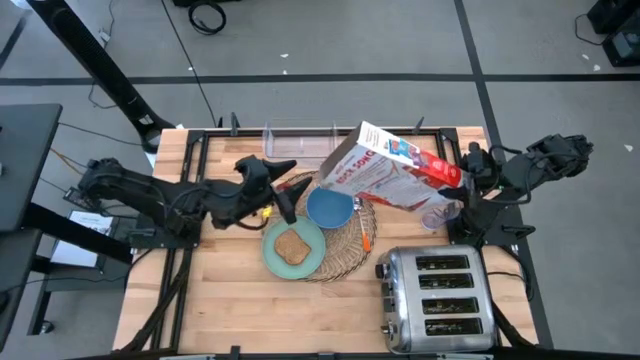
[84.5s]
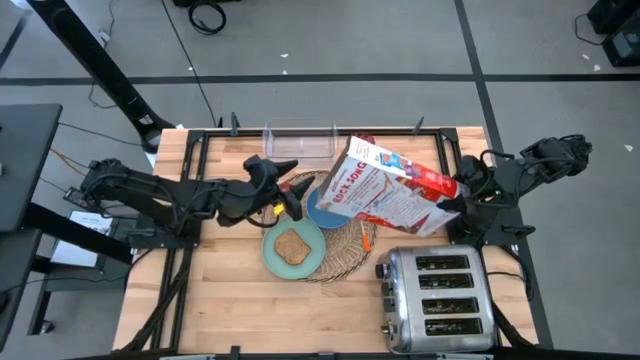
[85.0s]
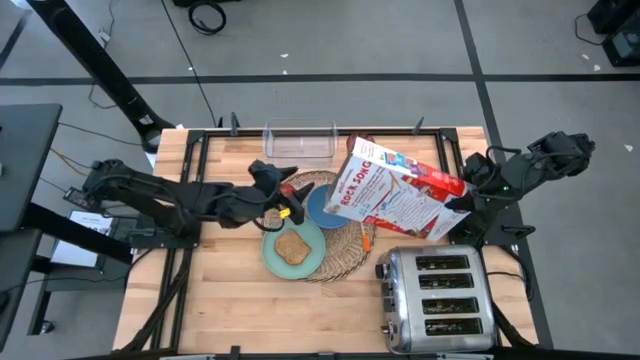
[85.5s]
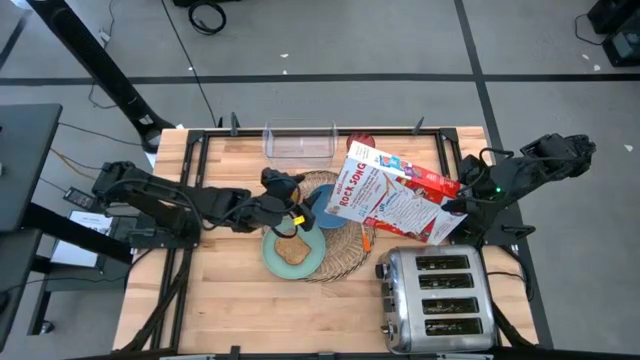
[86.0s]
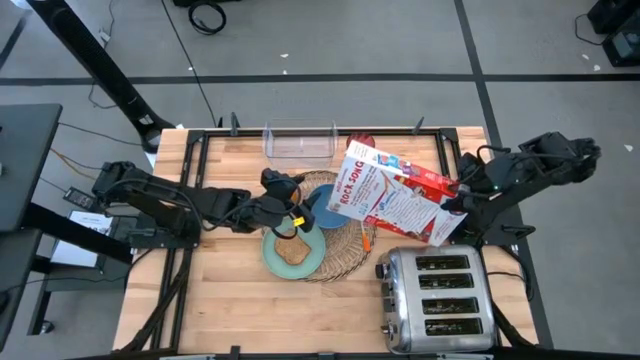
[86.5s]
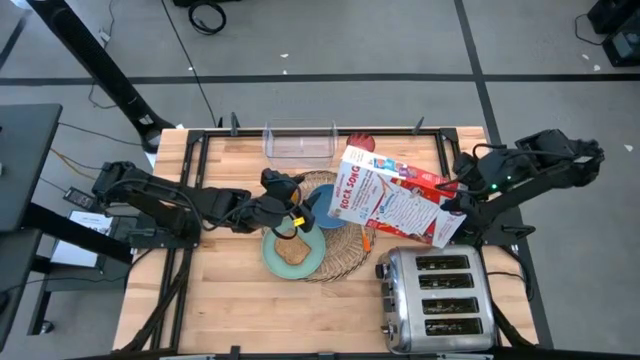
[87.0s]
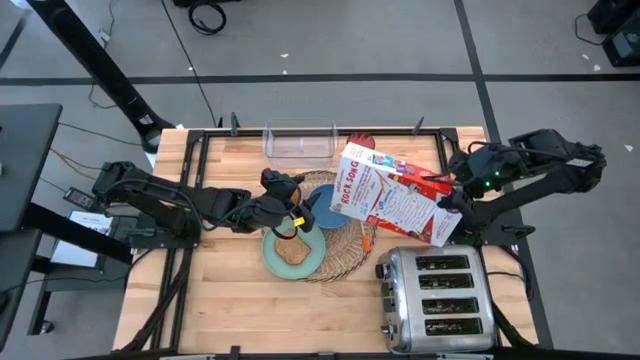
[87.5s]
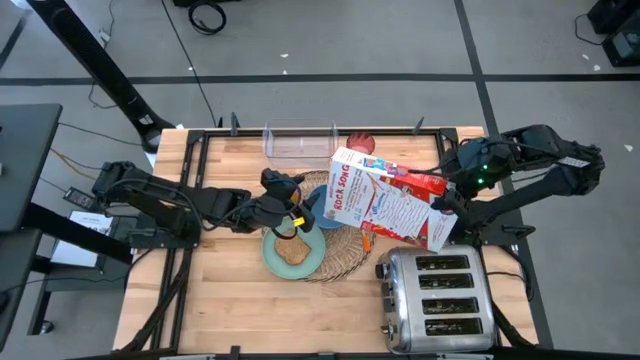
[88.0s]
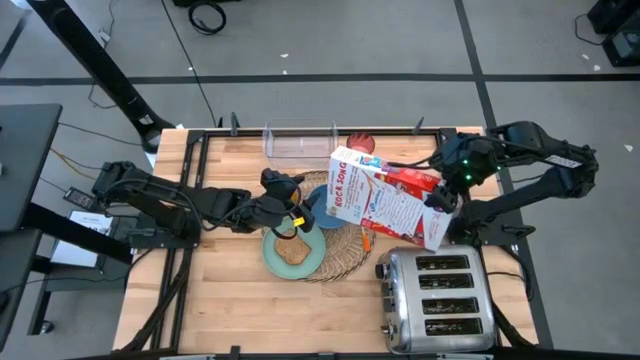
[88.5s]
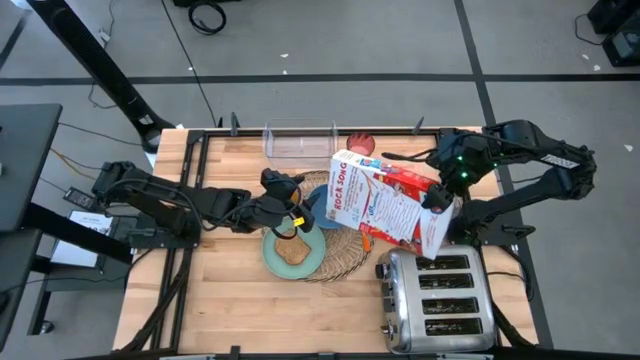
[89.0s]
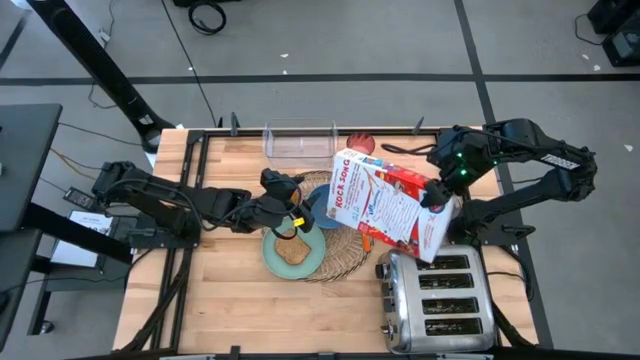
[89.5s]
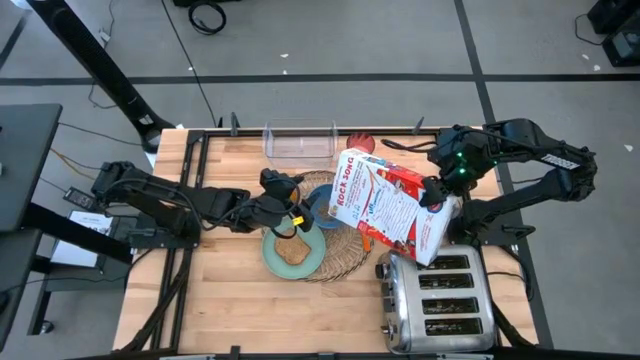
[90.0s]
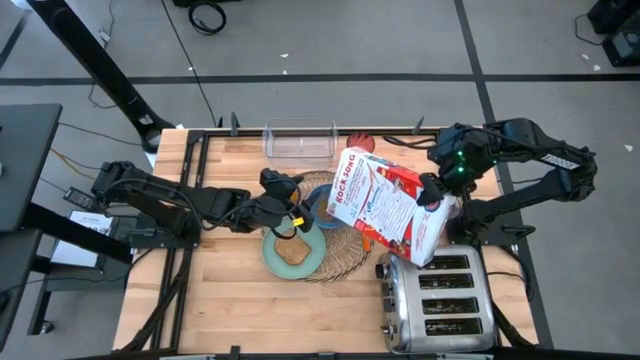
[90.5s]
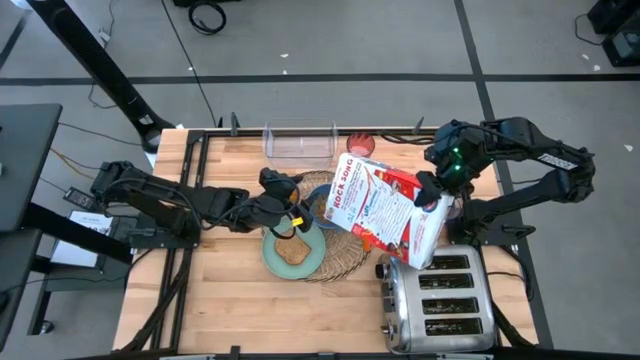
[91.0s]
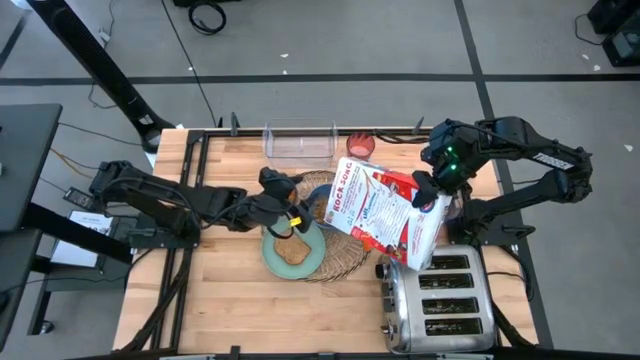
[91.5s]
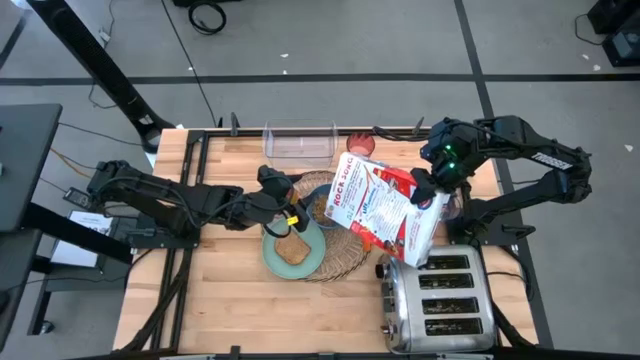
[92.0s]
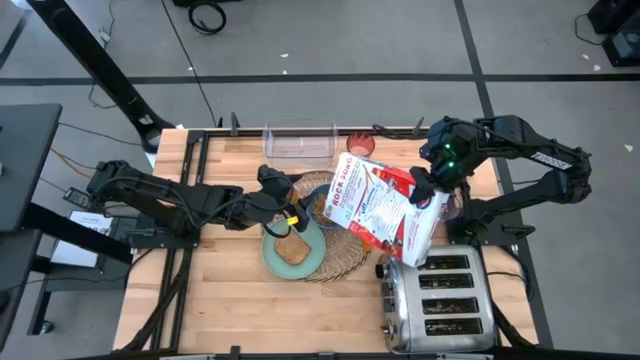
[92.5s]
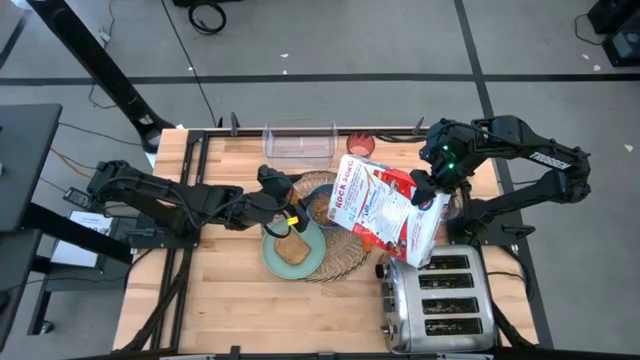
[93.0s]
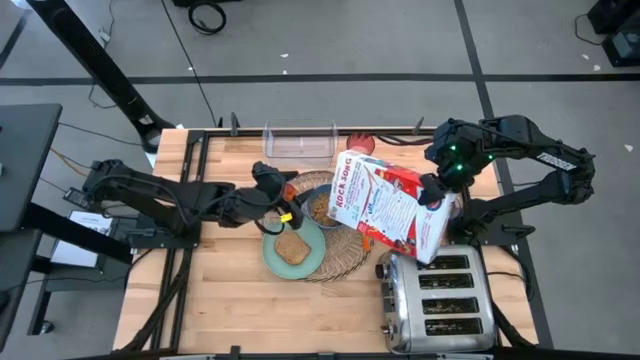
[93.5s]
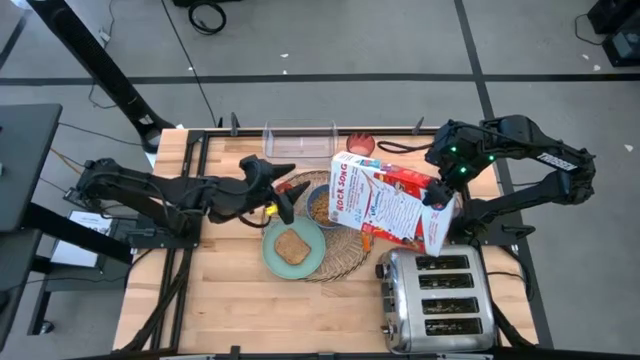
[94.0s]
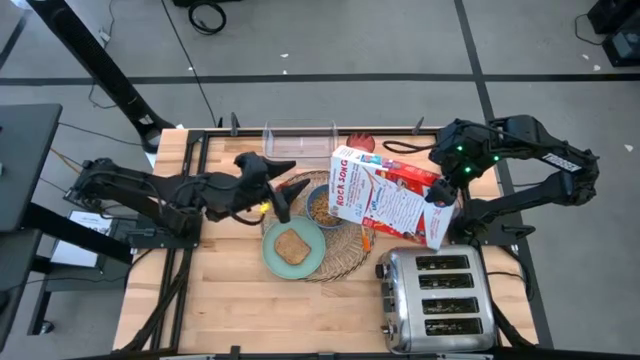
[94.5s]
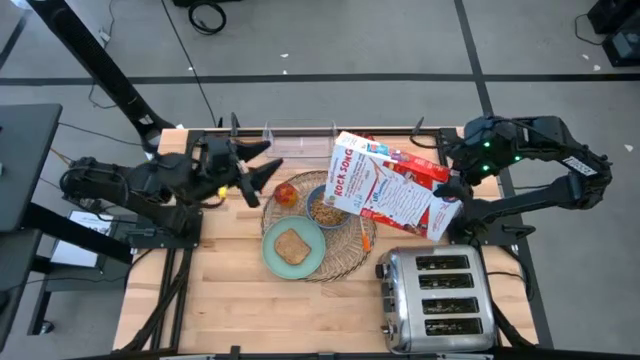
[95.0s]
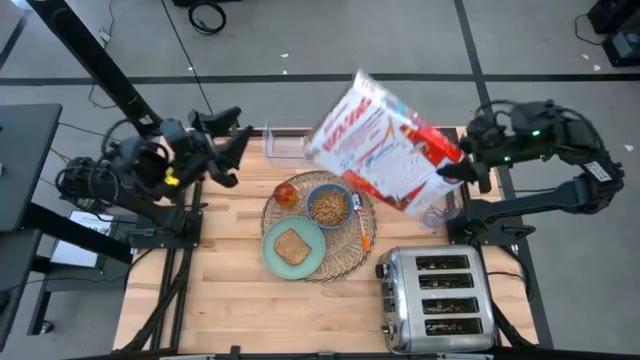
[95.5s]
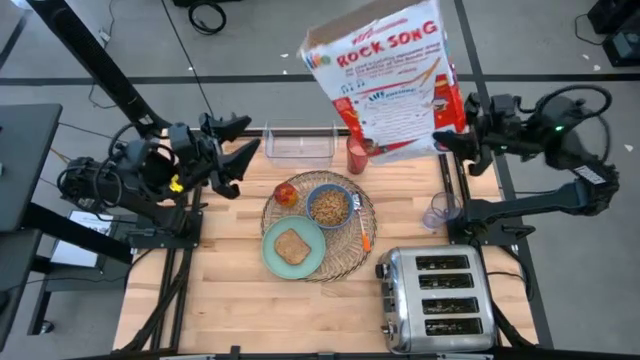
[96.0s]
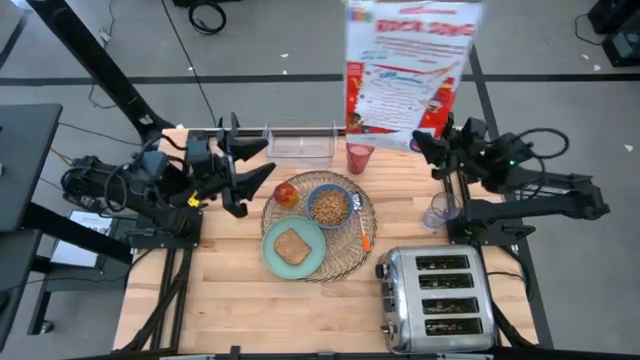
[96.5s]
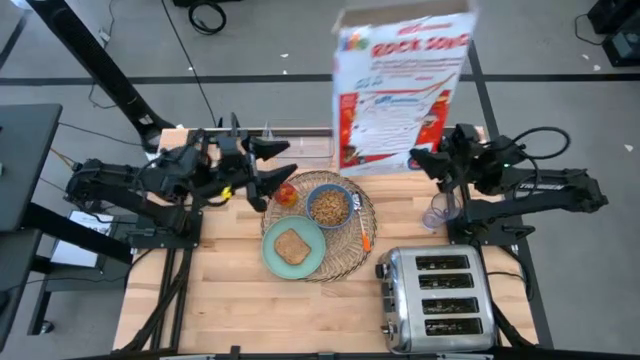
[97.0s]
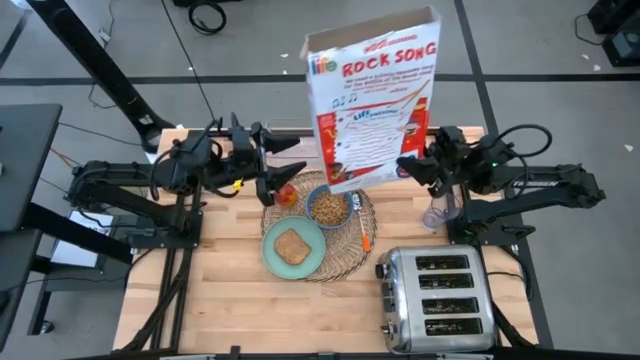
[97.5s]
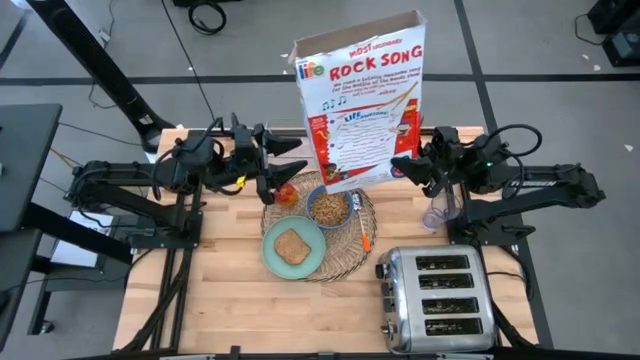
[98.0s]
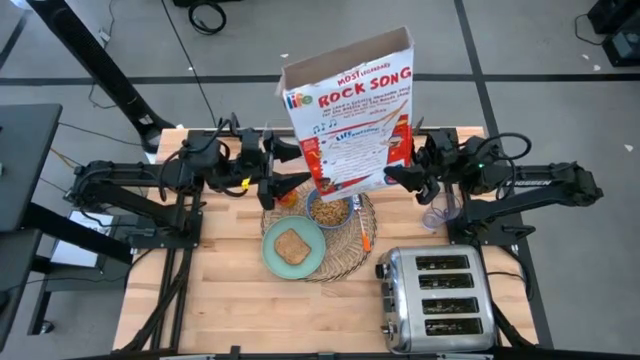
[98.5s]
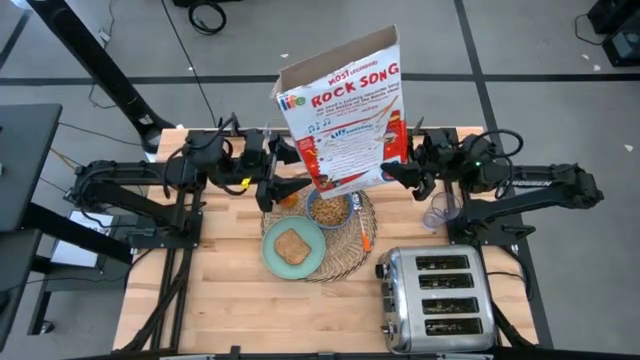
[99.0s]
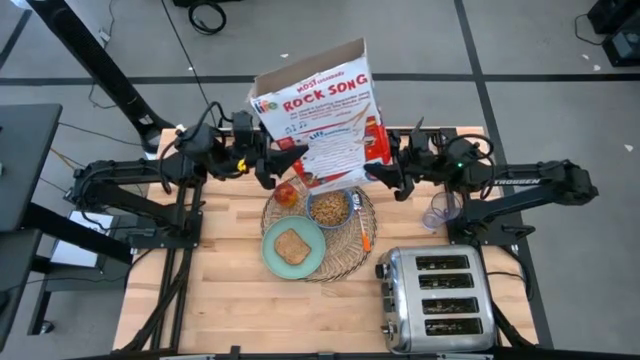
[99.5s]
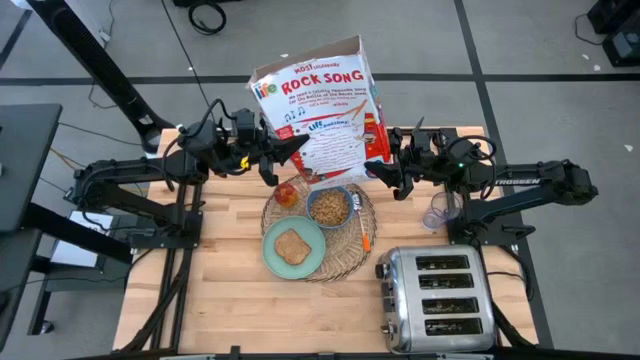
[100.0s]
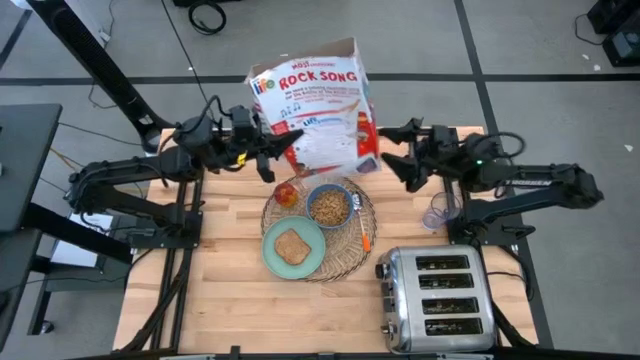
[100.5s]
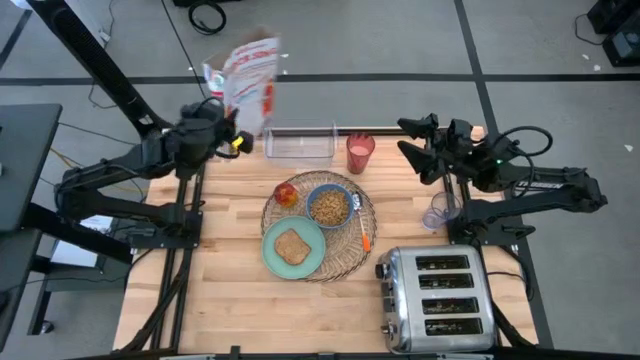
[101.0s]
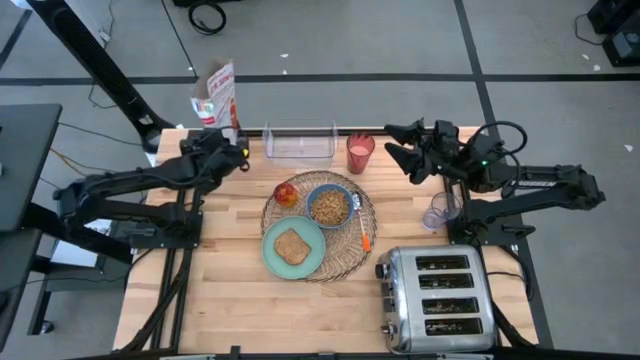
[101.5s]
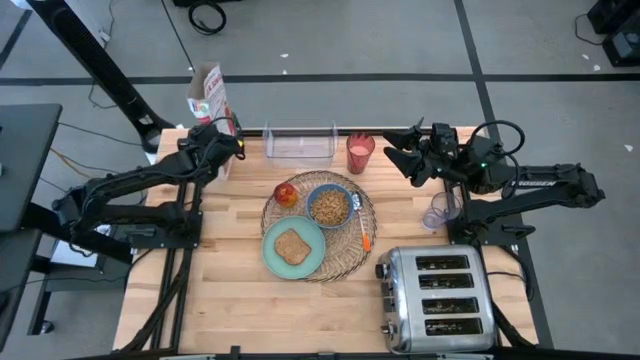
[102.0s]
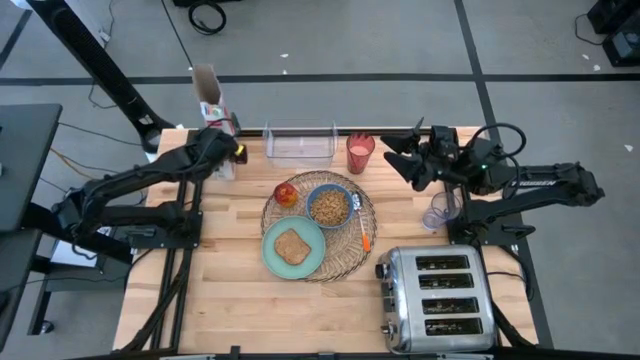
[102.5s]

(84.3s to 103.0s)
Task: Arrange a breakfast setting
Pour the cereal into the blue bowl

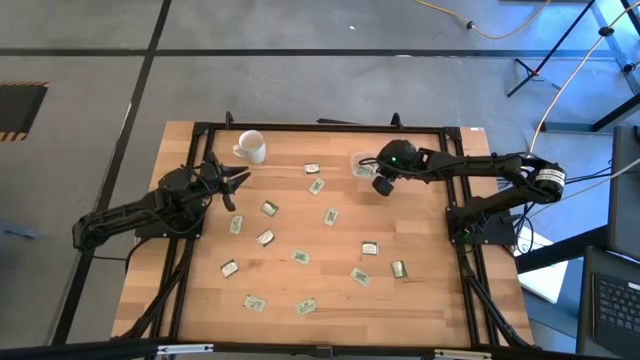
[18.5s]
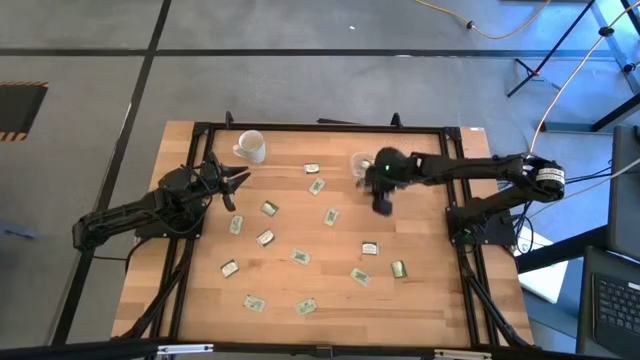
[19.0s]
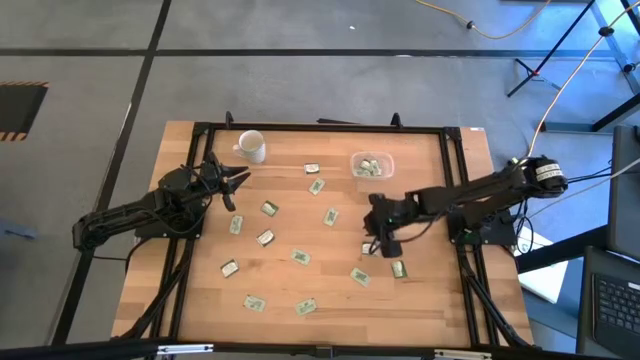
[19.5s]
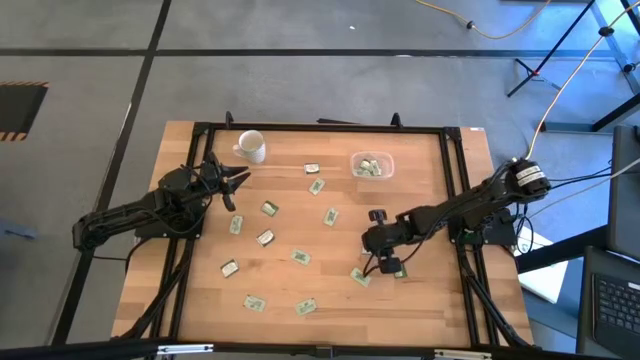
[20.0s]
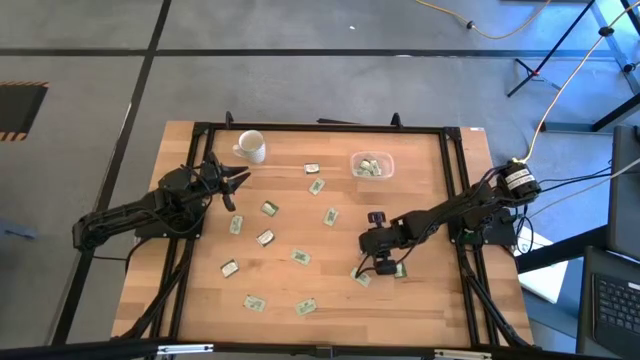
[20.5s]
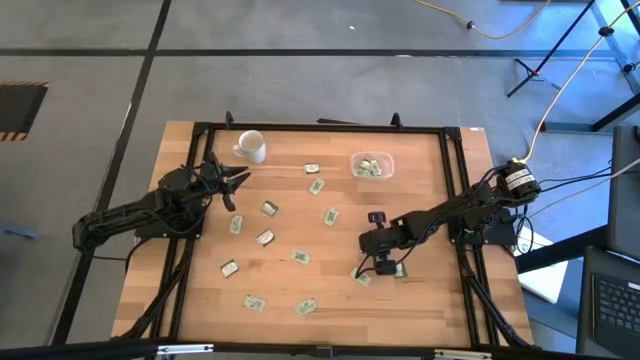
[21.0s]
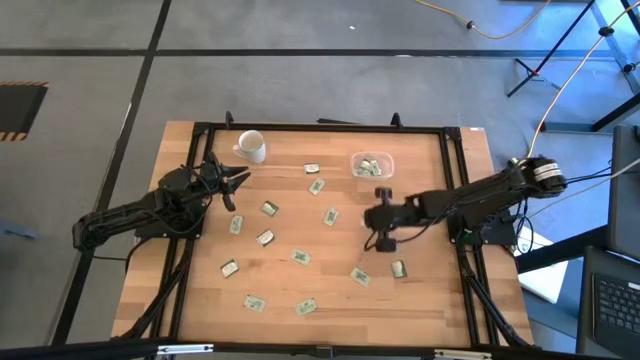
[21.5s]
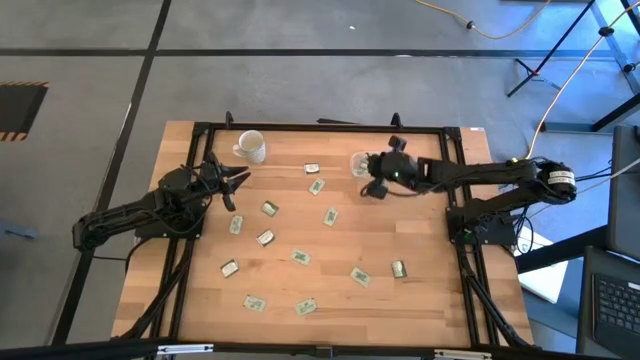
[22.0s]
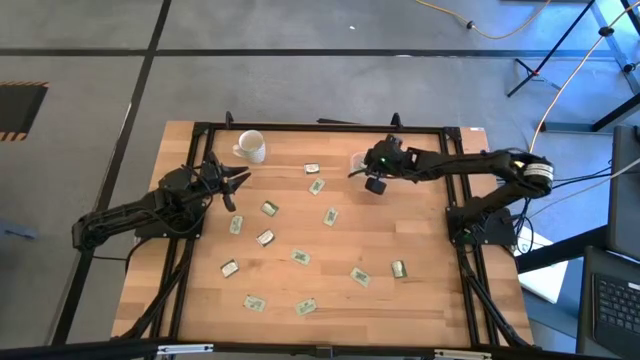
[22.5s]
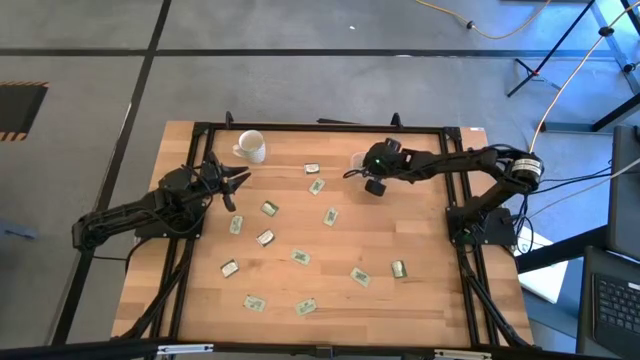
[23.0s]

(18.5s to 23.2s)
Task: Pick and place items into bin
Put the truvia packet into the transparent bin
